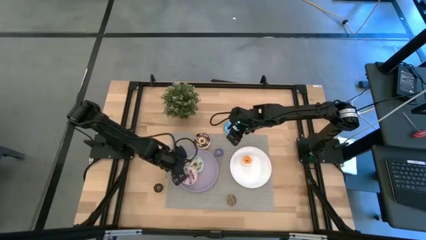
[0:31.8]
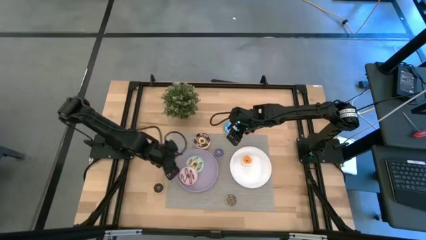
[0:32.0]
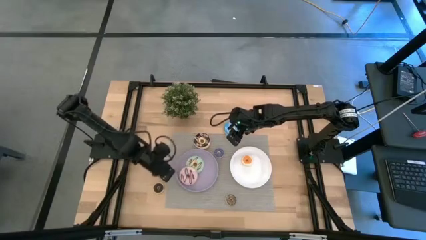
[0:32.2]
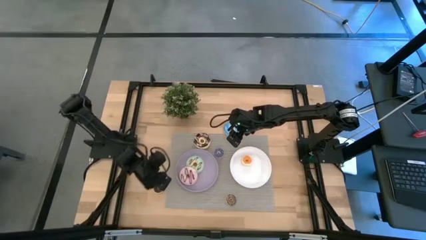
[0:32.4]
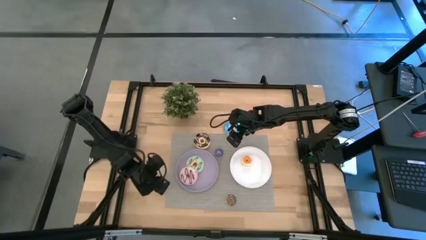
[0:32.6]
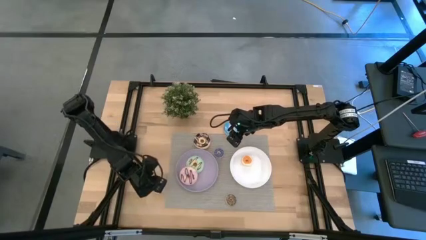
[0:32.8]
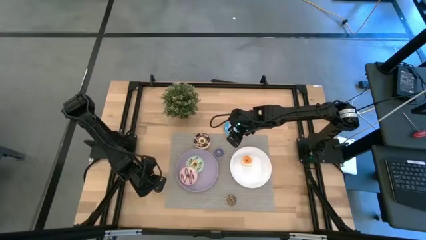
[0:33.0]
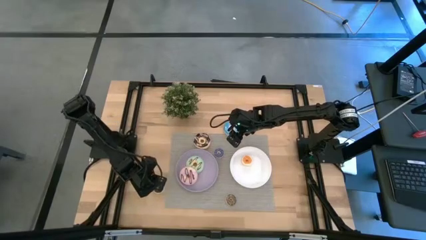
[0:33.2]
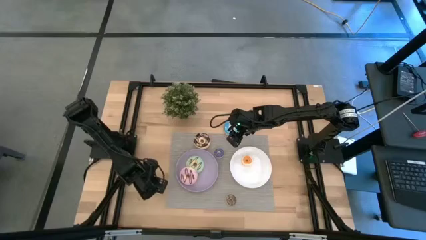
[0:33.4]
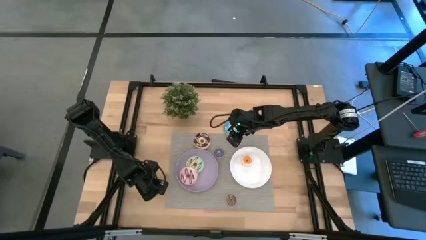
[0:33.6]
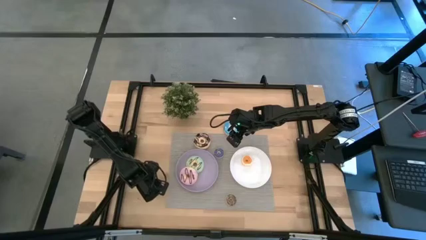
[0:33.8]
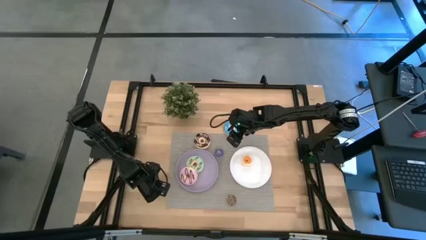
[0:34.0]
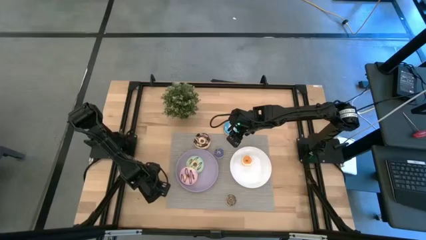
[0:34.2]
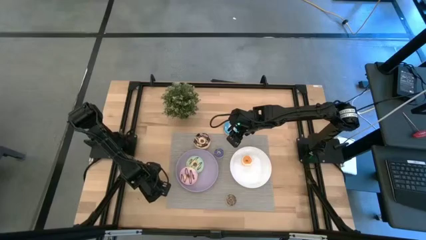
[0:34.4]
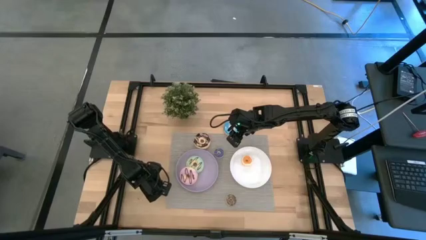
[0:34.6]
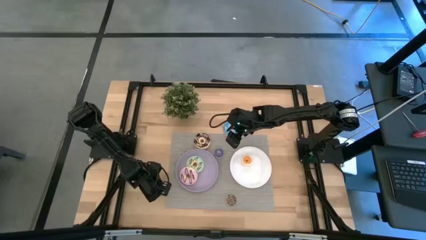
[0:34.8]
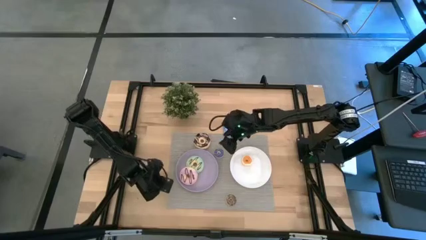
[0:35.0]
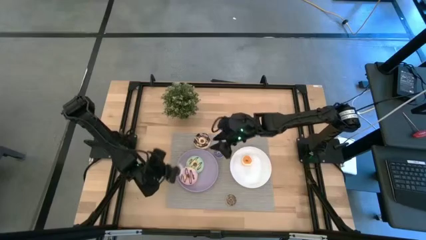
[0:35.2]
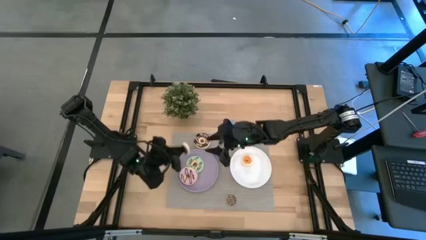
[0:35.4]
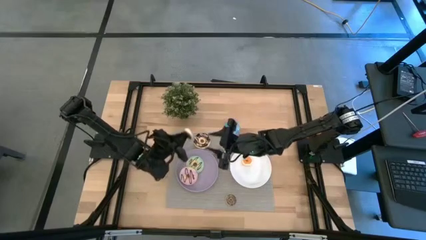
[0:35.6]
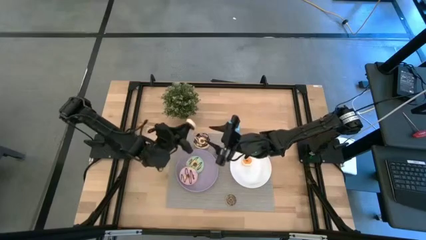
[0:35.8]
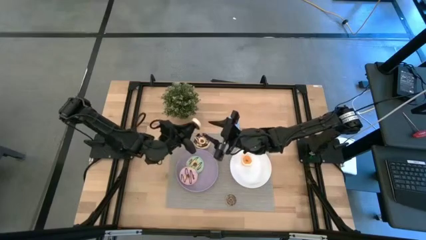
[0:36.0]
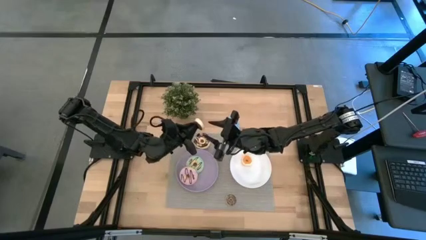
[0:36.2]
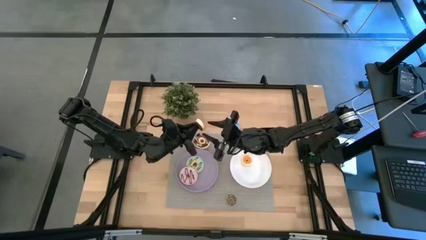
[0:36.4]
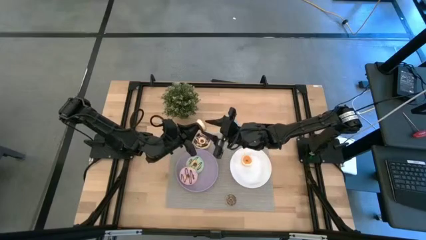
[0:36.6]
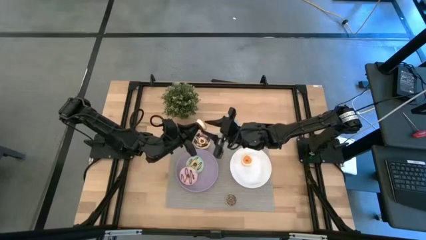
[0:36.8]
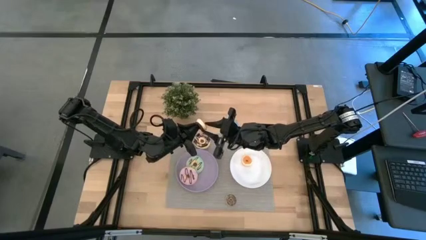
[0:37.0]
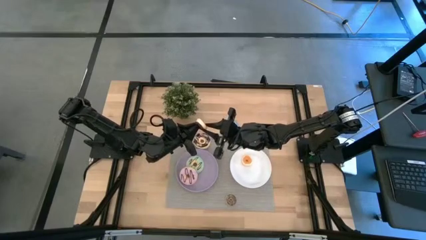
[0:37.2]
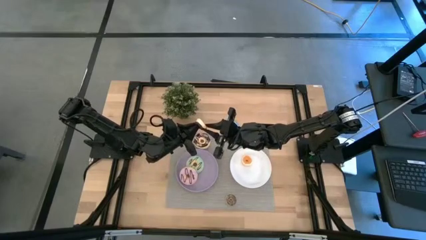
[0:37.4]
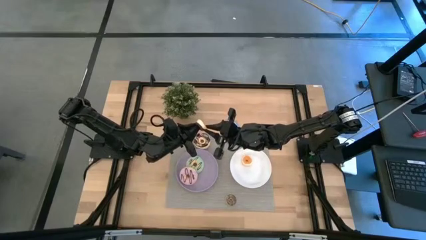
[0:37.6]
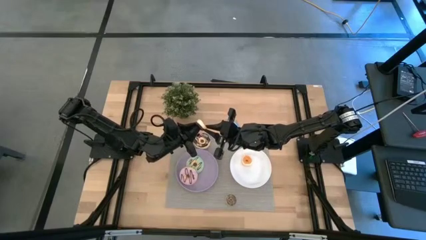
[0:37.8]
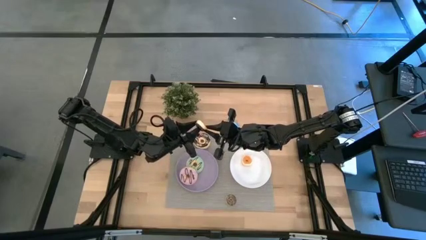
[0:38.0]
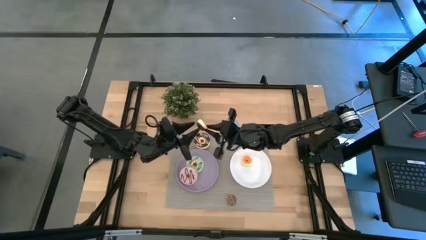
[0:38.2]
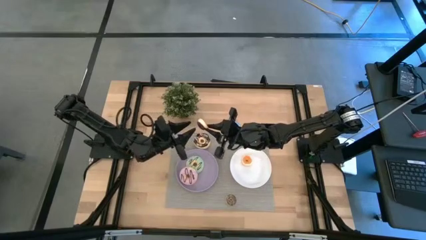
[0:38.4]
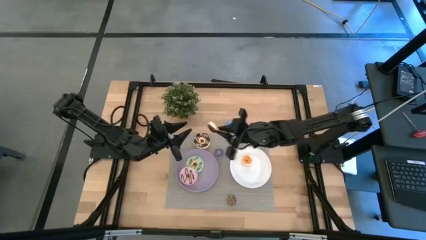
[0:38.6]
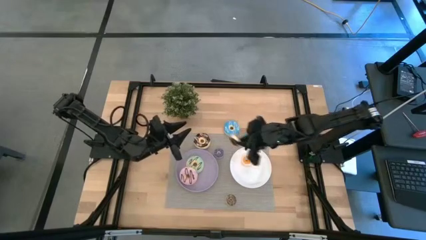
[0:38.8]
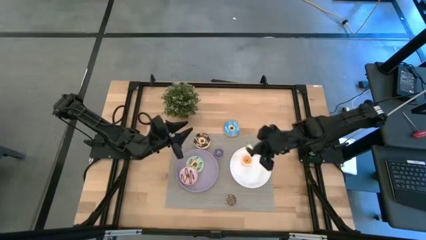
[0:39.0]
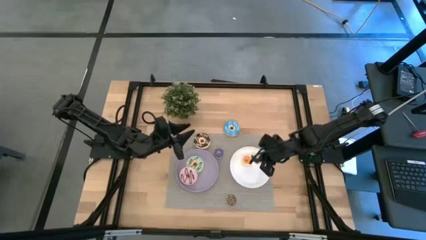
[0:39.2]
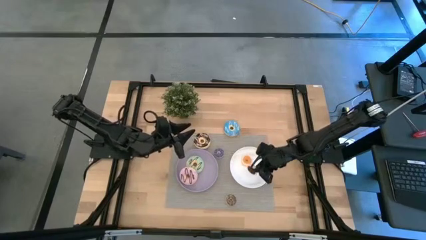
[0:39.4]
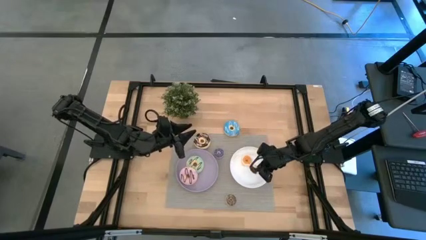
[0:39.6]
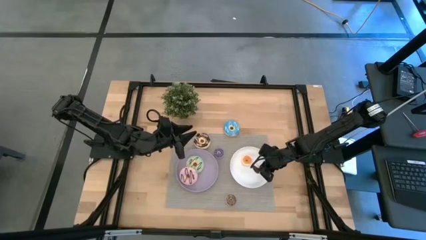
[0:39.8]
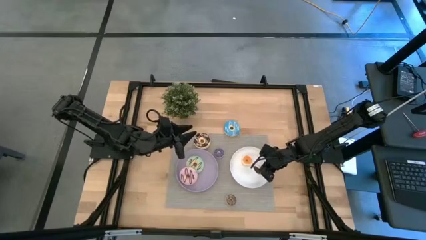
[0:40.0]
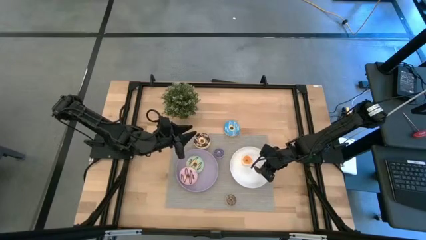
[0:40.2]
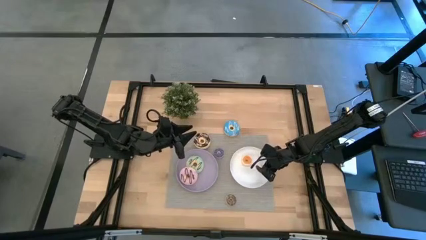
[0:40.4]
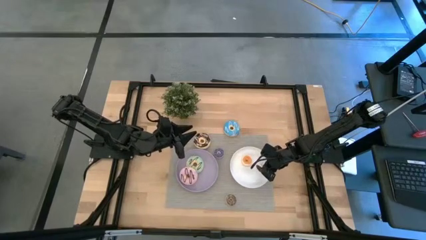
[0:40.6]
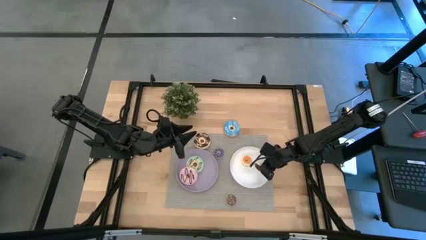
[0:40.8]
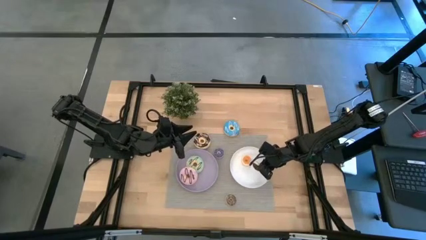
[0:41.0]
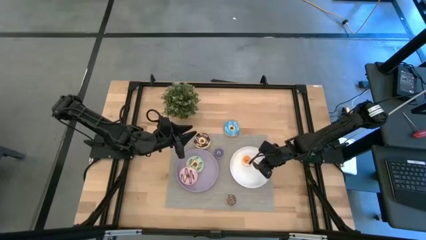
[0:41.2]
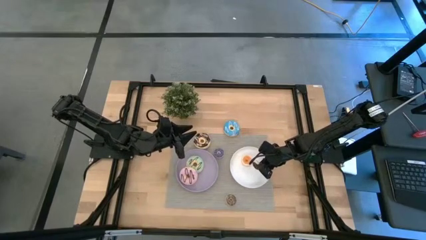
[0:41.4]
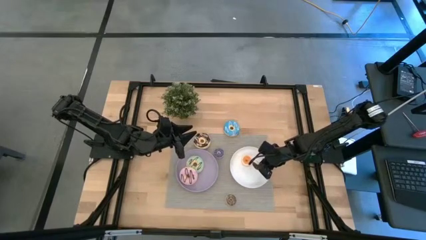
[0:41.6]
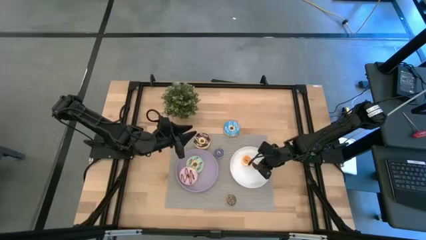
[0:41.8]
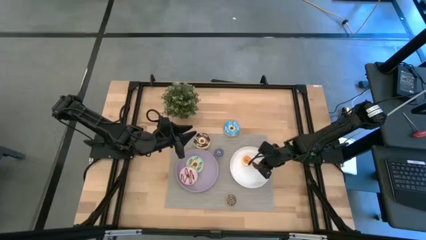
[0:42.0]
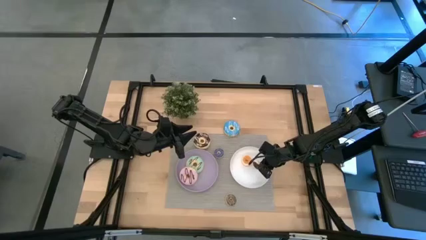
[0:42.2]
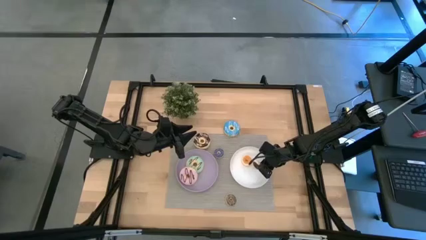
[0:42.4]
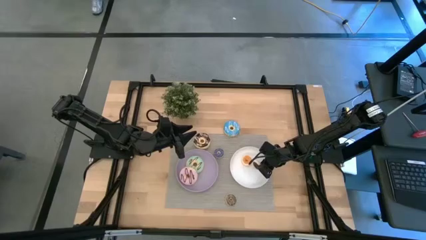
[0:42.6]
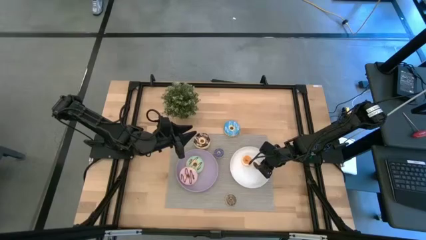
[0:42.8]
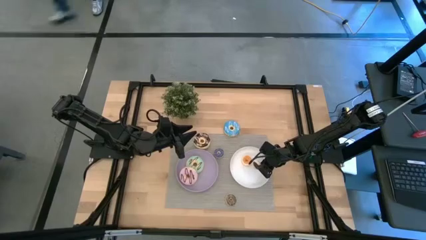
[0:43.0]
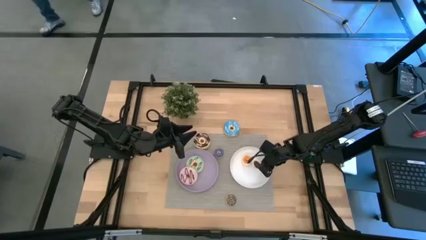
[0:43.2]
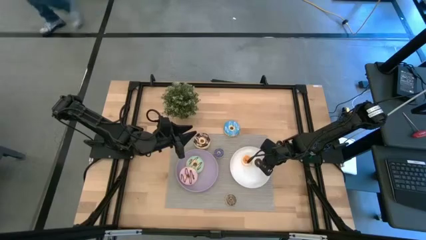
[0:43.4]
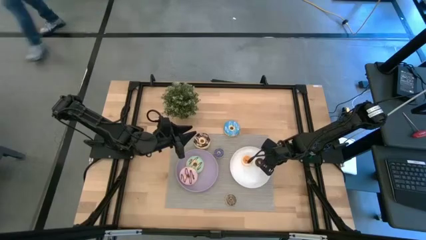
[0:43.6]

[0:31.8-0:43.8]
Task: Pick & Place donuts
Put the small dark brown donut on the white plate

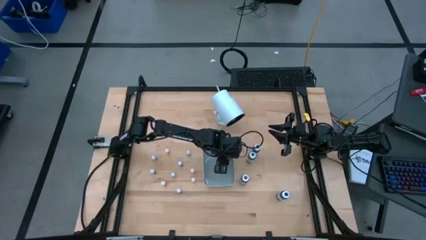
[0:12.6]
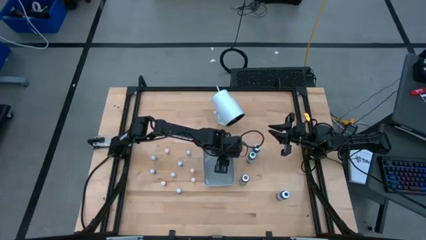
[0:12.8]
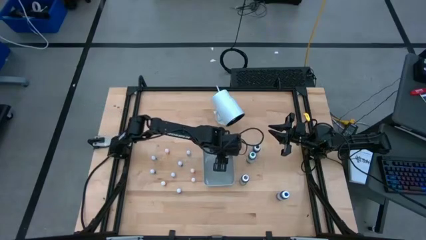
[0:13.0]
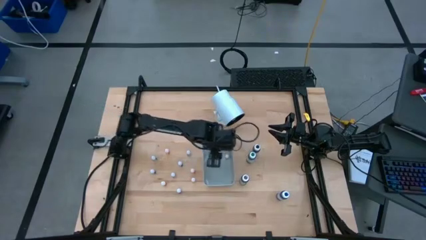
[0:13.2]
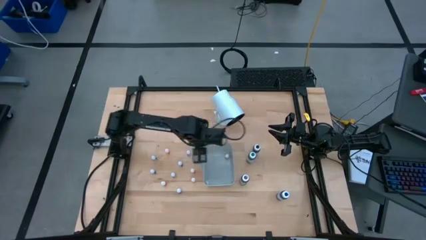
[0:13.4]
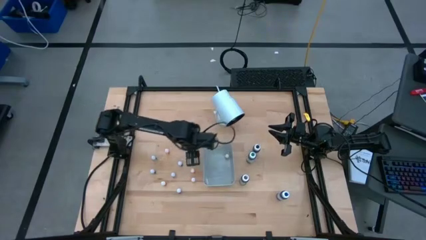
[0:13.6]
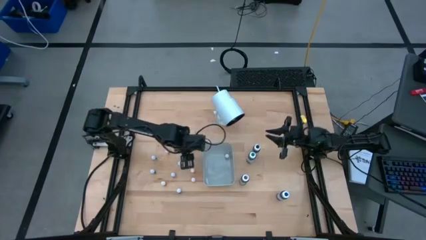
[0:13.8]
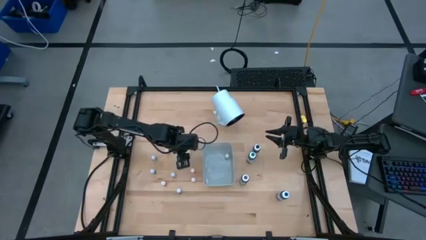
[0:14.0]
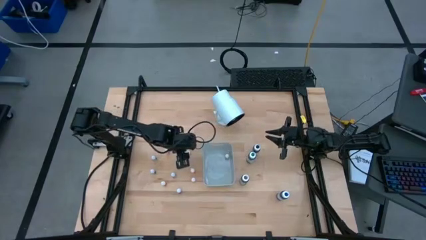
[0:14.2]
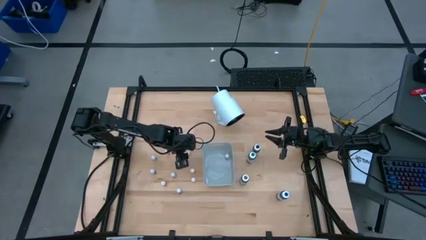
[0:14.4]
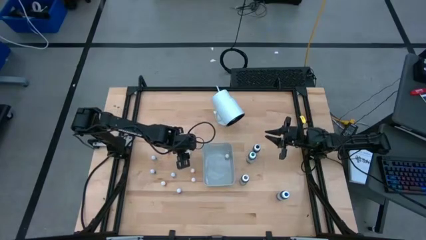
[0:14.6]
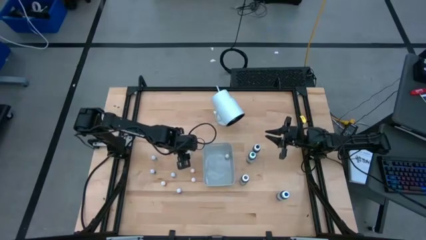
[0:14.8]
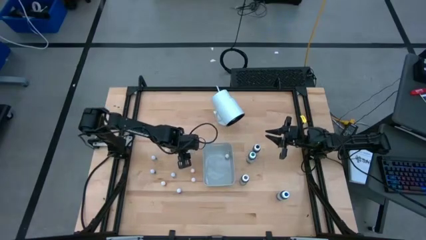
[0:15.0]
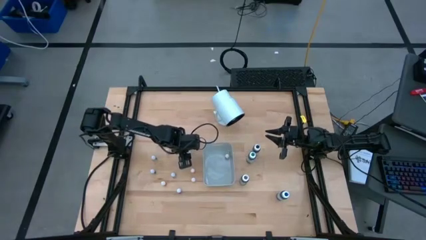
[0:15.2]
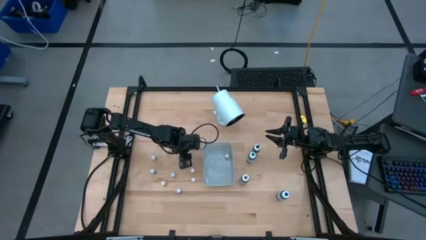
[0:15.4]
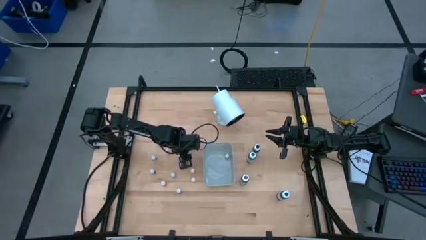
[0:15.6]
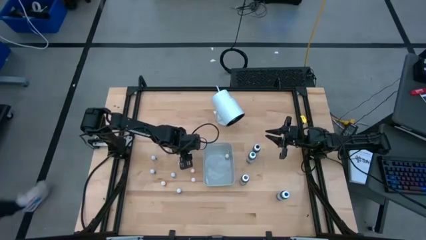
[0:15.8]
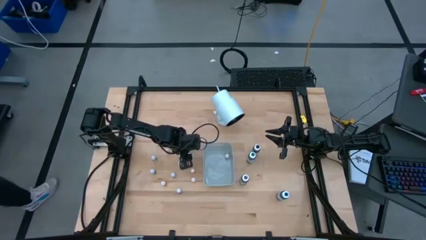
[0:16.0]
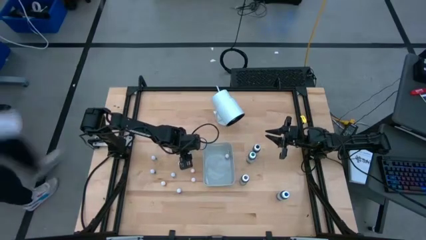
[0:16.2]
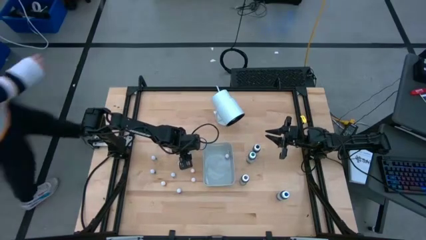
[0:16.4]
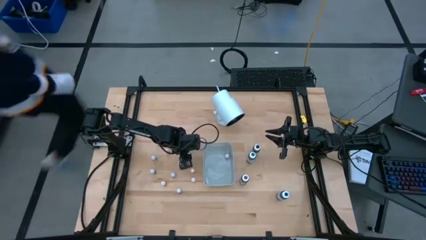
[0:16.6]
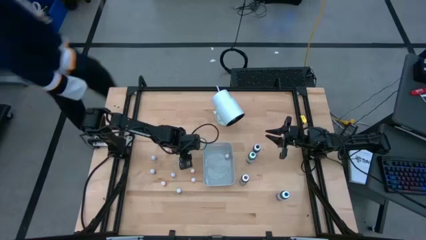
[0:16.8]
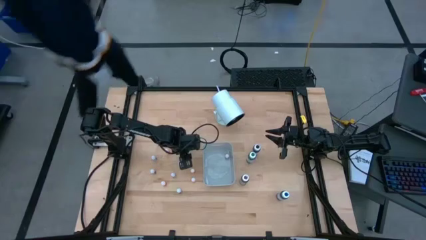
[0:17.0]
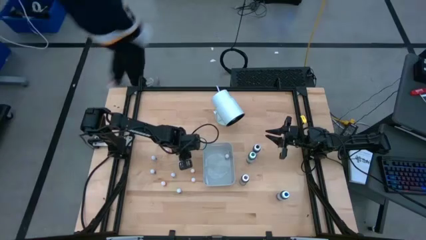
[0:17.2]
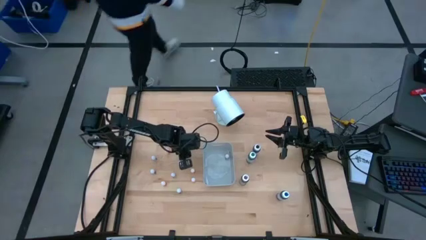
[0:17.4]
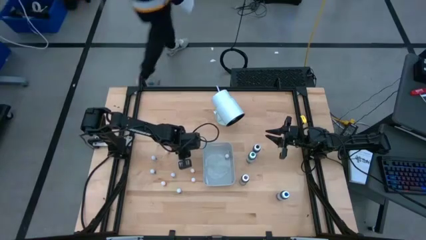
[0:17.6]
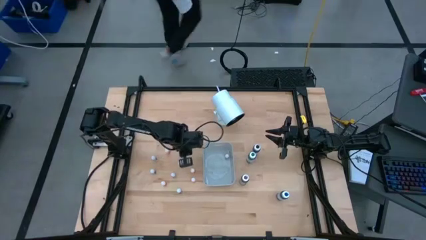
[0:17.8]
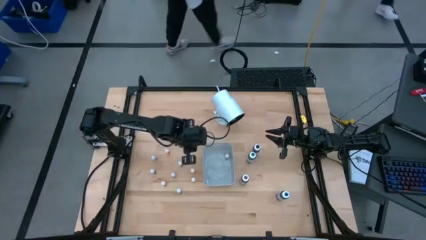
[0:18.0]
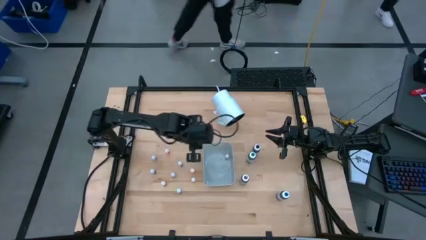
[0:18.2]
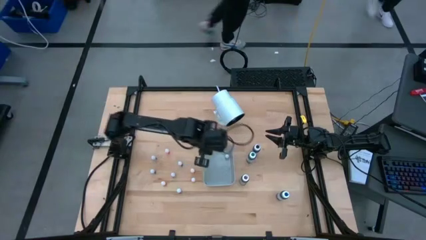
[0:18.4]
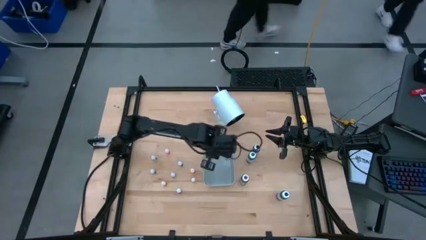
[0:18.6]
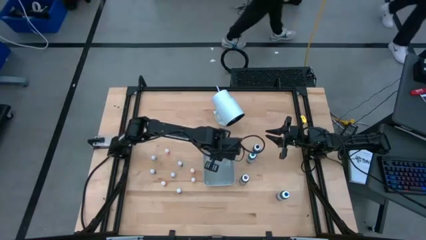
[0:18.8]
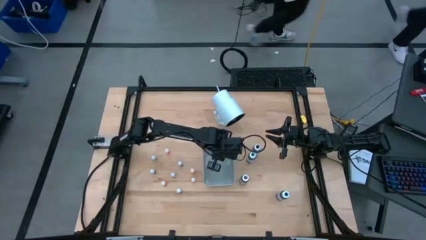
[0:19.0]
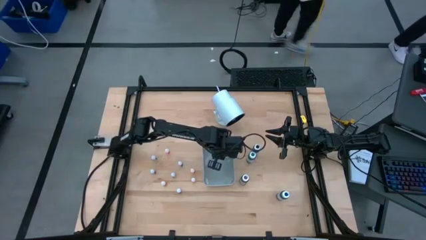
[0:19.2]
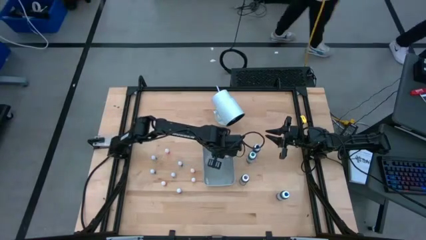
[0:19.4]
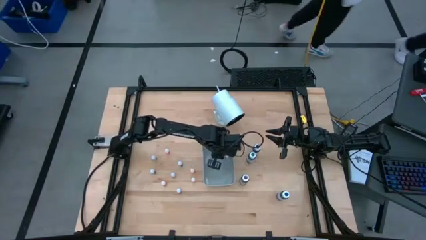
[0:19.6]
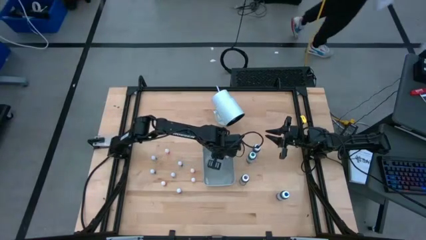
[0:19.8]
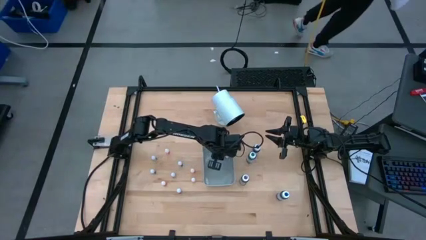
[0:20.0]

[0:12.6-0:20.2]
Task: Pick & Place food coloring
Put the top small black food coloring bottle into the gray bin
